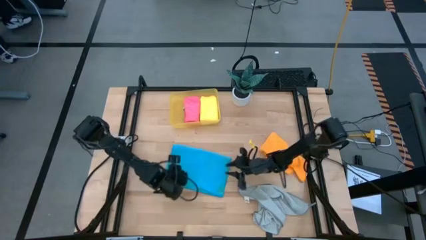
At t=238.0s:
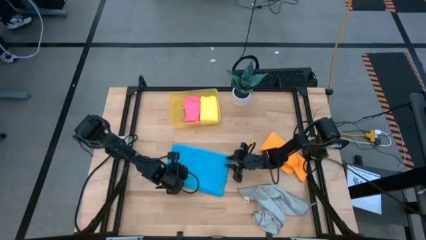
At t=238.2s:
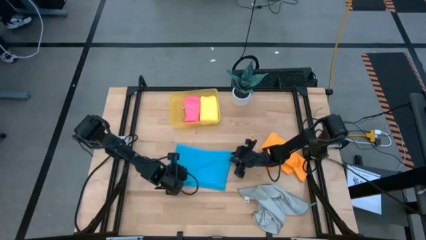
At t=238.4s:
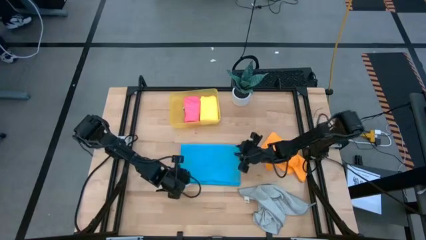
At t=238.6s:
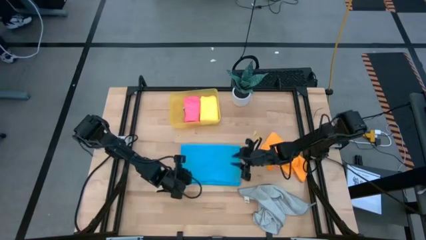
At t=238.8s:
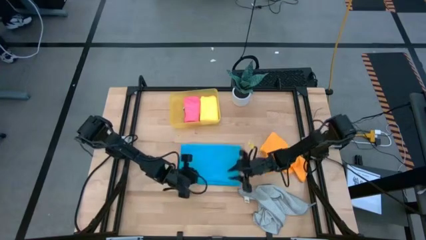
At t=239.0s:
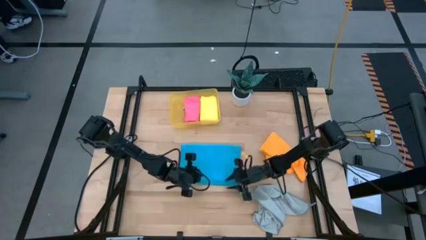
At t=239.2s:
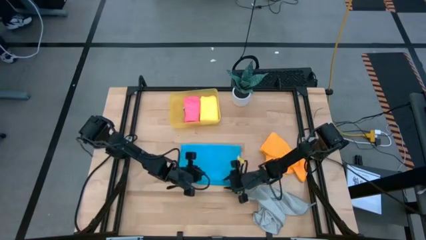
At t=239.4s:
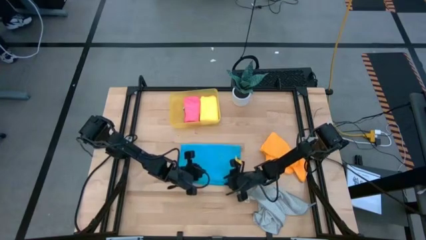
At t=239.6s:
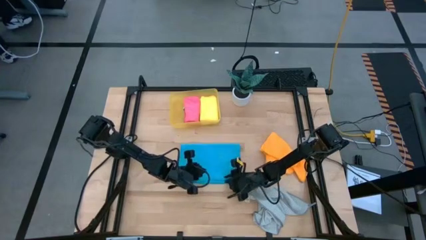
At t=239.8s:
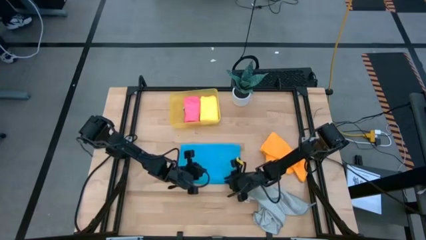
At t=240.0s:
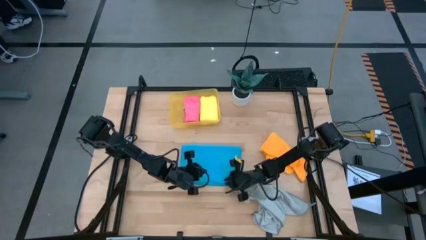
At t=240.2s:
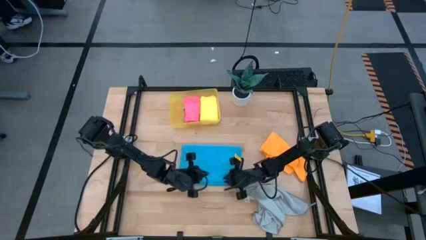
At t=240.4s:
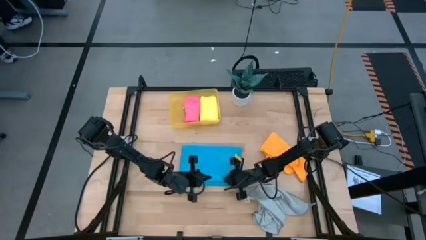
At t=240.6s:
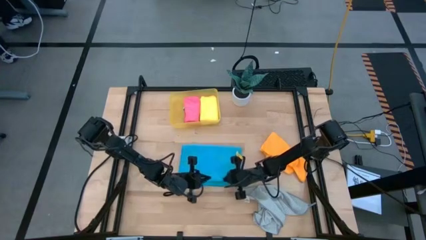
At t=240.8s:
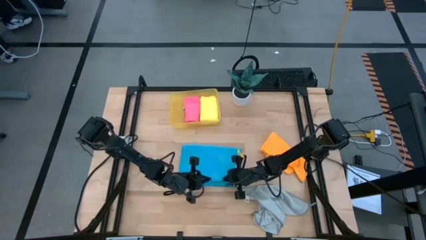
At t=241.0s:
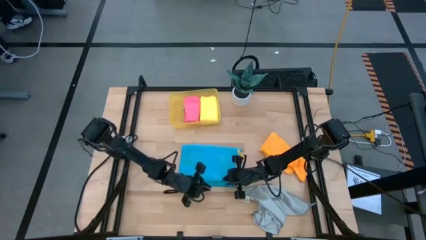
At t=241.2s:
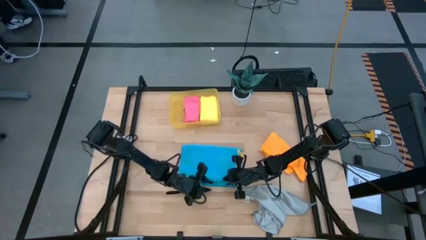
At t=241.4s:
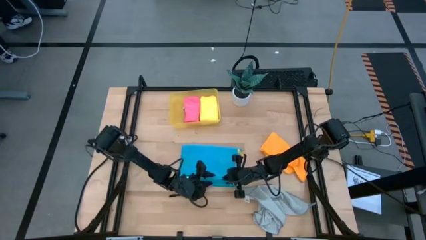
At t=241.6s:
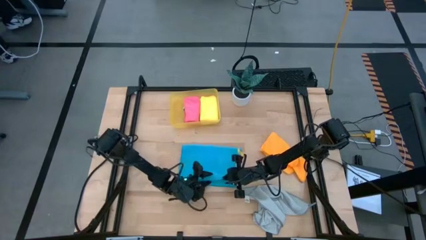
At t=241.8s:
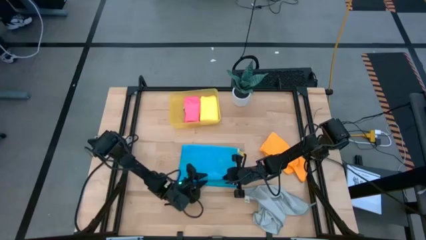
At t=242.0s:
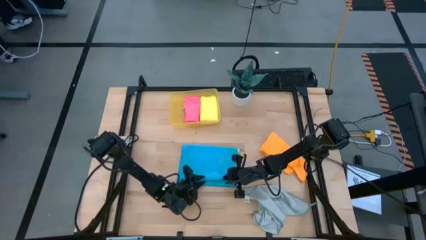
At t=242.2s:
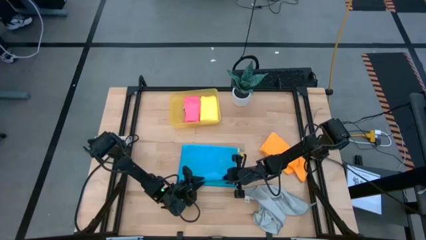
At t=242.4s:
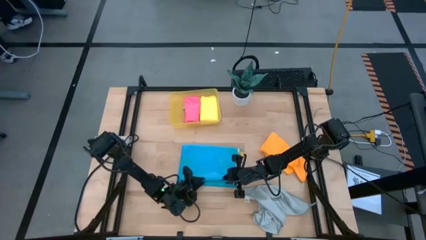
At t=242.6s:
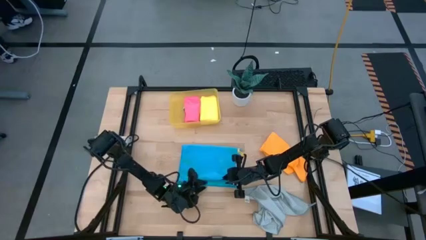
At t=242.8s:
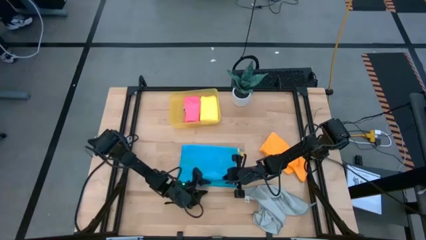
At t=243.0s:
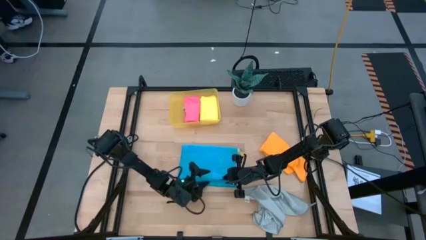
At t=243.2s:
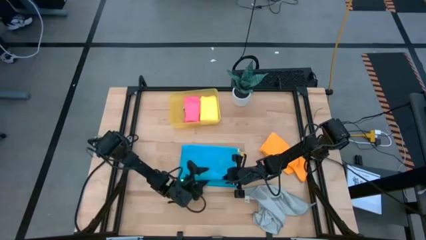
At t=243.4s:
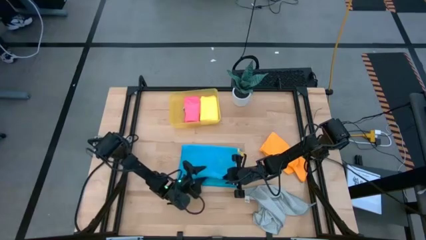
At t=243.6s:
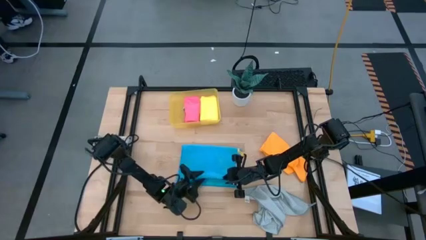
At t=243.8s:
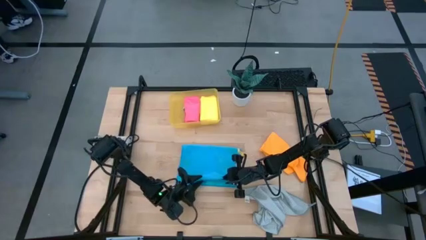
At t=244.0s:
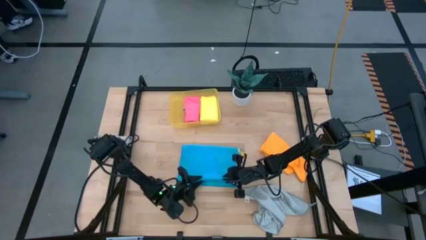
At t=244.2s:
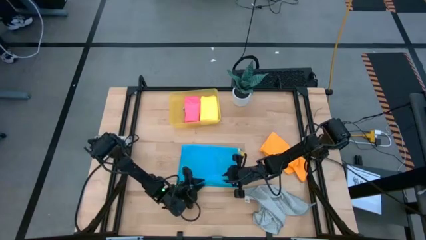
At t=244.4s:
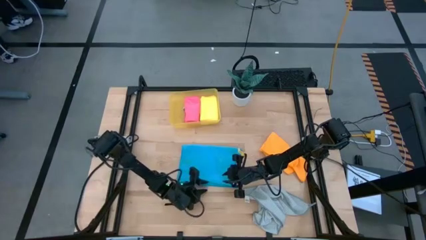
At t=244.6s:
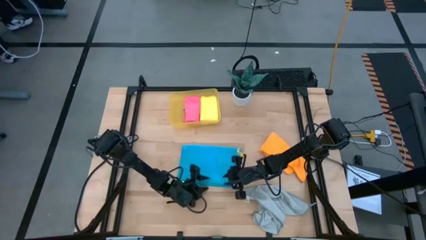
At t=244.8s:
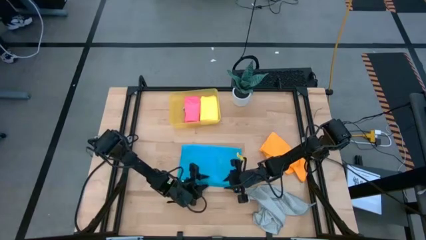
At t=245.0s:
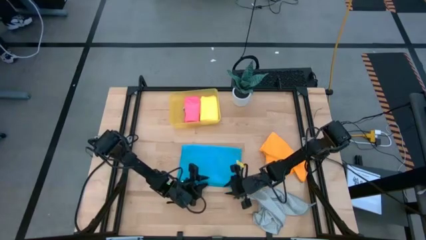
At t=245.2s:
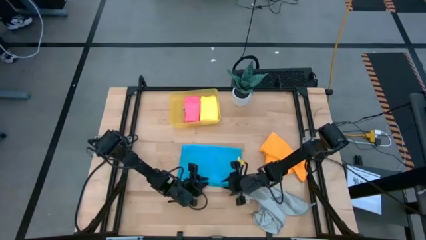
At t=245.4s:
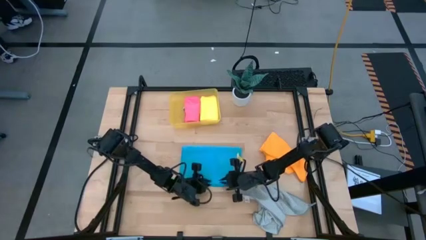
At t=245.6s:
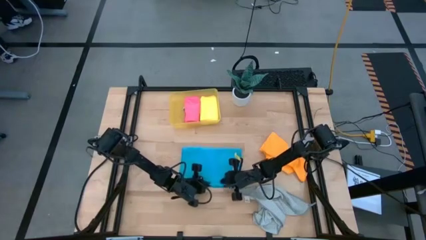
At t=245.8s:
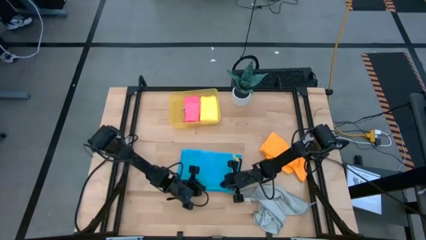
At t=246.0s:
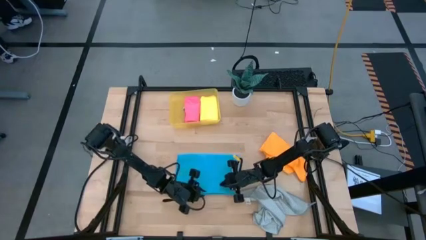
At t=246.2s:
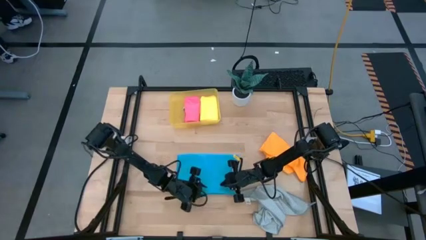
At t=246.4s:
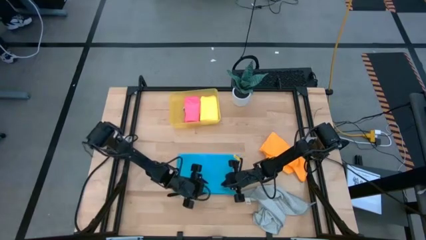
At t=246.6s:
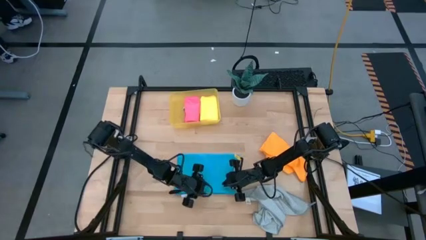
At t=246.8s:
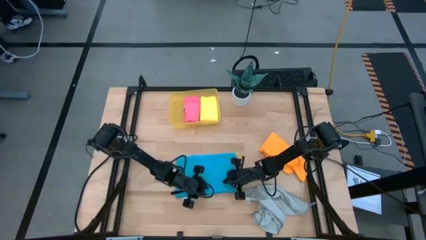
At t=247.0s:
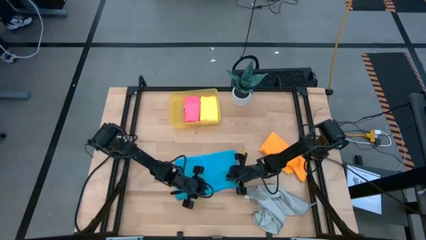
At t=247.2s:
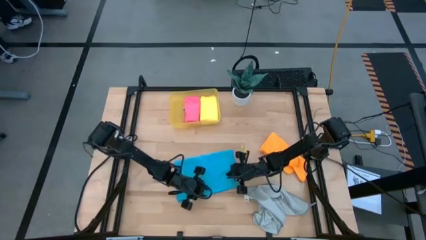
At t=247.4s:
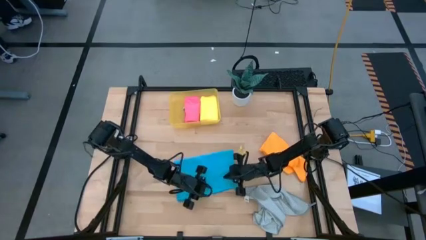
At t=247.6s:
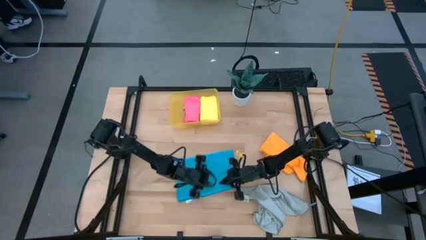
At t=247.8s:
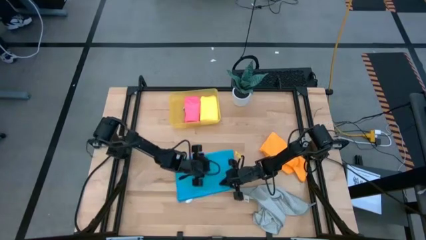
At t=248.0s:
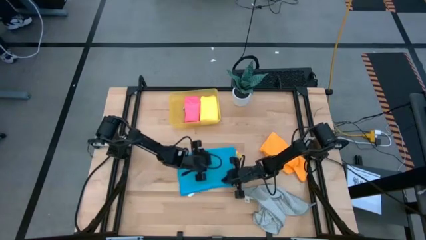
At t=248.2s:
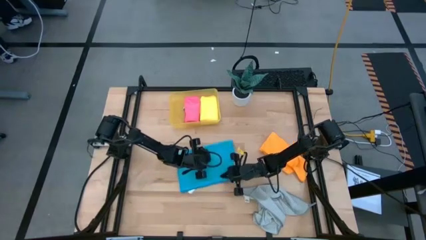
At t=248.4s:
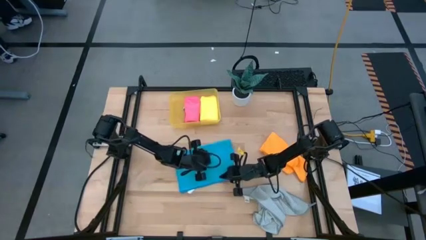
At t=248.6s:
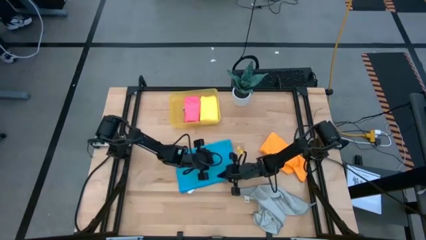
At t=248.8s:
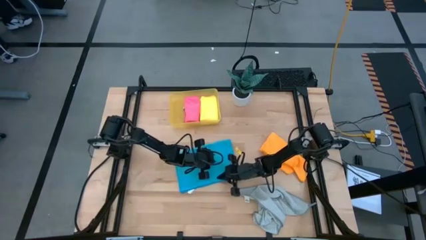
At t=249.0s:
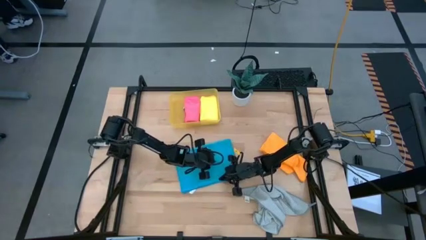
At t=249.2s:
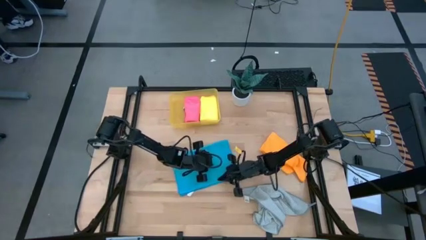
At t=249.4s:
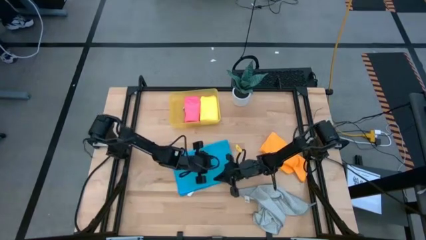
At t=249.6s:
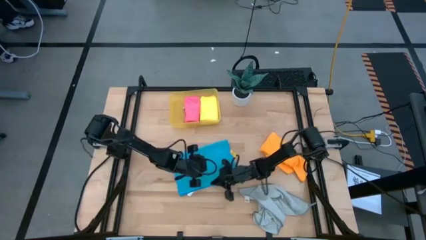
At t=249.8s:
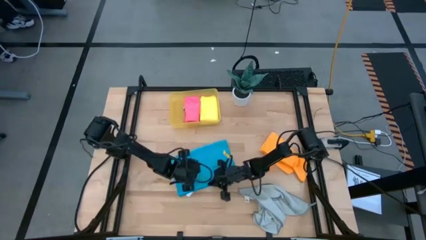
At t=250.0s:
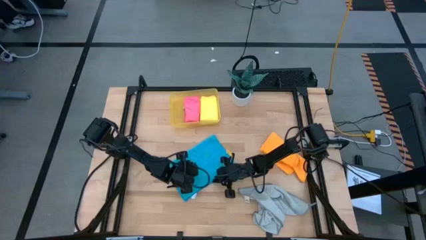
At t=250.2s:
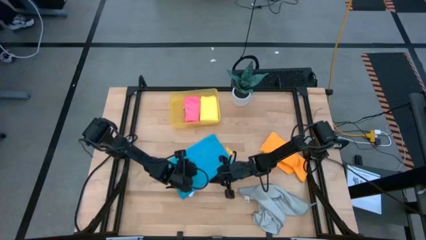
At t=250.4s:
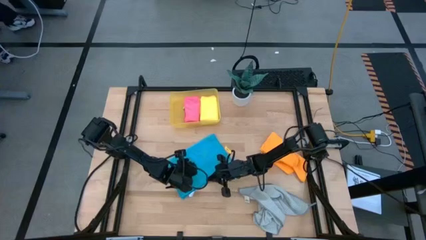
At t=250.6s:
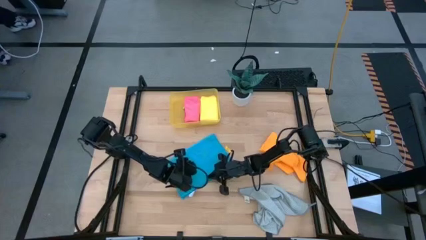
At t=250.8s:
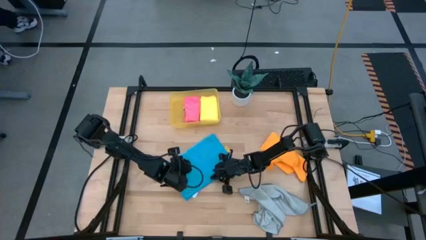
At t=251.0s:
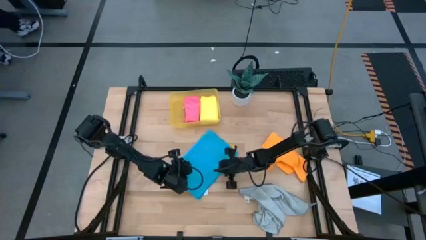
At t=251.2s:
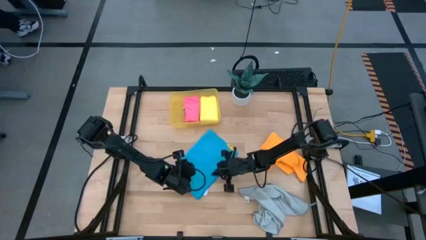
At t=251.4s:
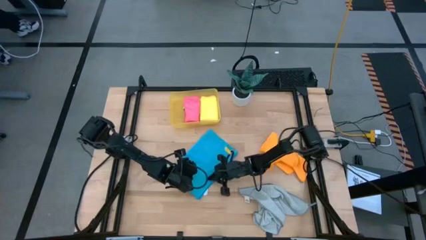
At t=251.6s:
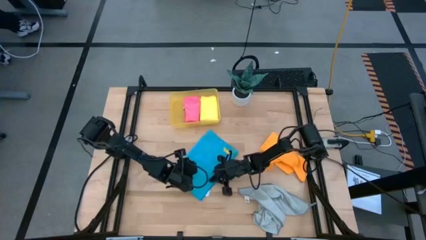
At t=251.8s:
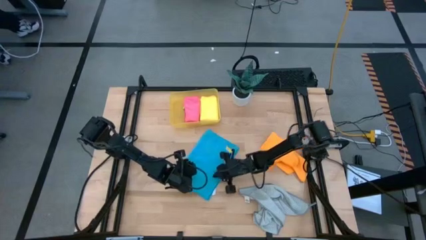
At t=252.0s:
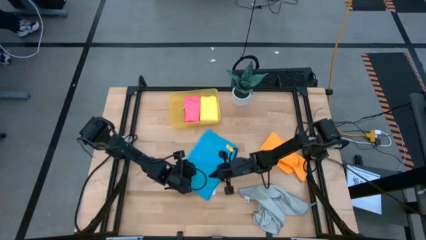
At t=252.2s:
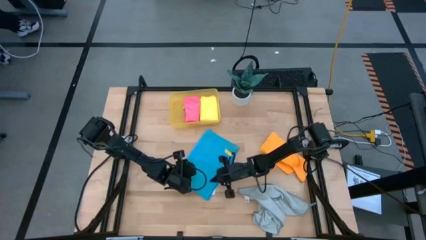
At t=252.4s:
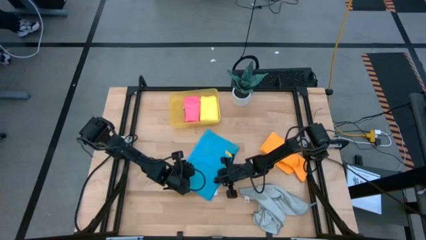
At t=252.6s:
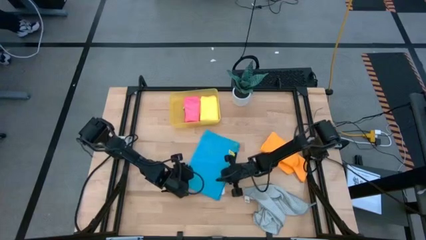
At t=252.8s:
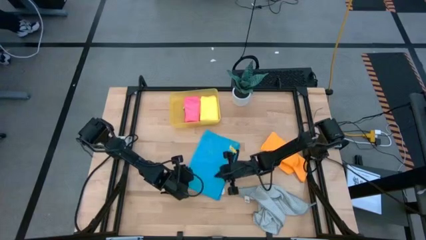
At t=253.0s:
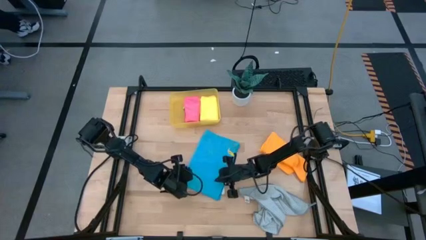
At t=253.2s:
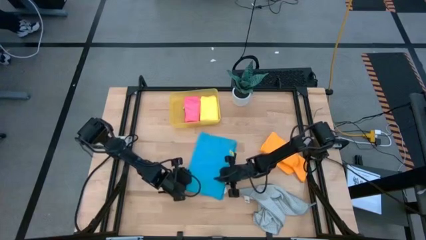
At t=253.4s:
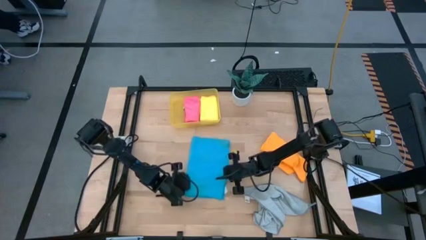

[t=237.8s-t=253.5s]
Task: Fold microfiber towels
Fold the blue microfiber cloth

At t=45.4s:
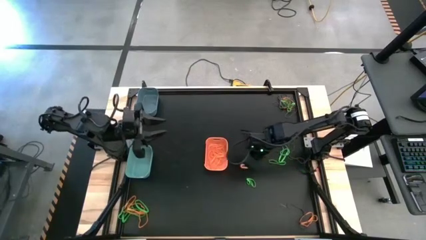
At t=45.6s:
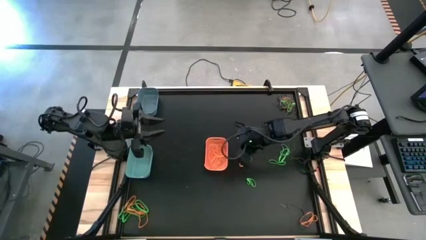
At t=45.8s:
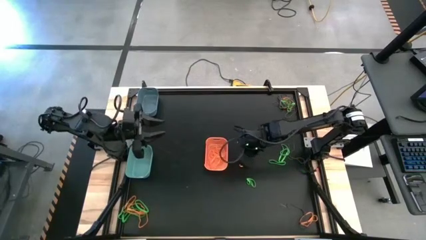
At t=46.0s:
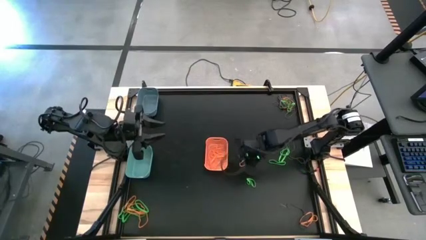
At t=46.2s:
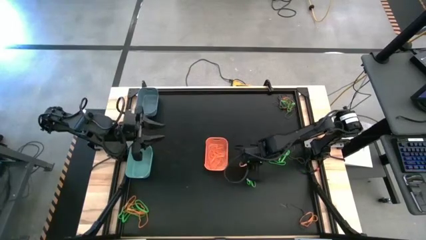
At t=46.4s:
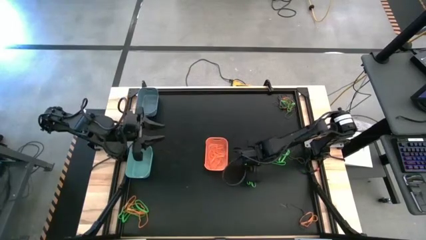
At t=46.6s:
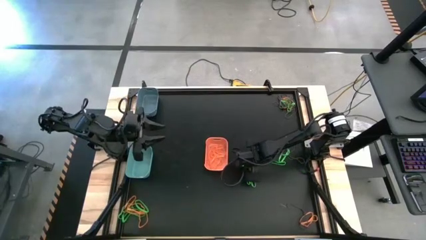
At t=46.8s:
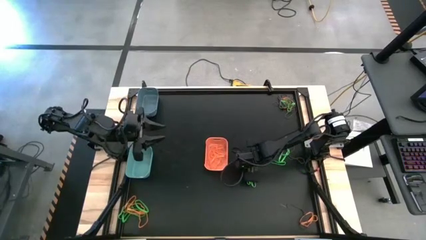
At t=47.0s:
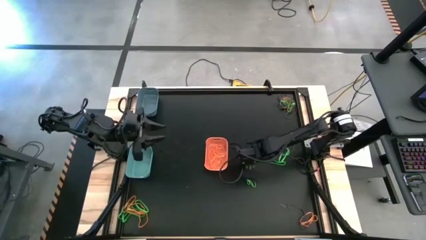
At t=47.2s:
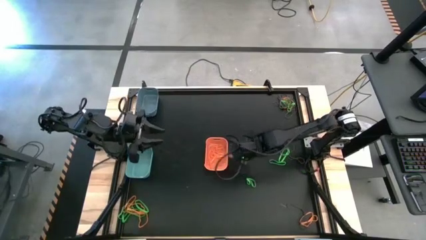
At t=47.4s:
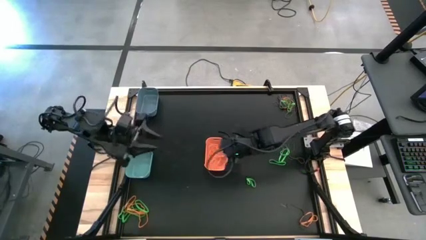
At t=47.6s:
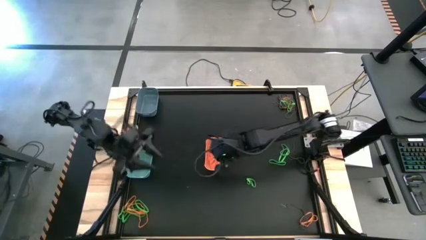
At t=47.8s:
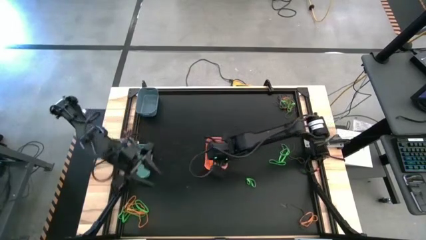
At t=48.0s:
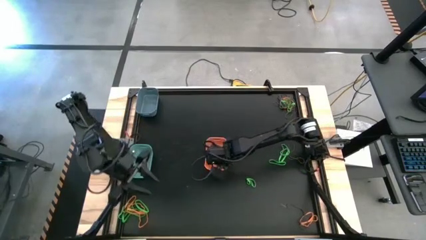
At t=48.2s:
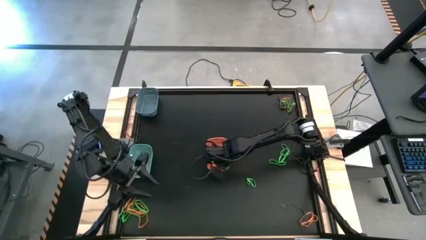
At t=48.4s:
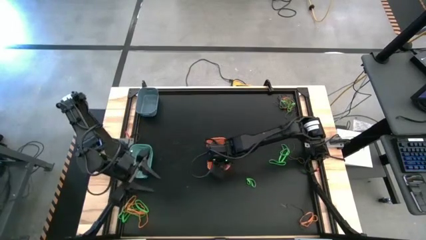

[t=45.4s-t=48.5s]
Task: Sort rubber bands into baskets
Put the orange rubber band into the orange bin
